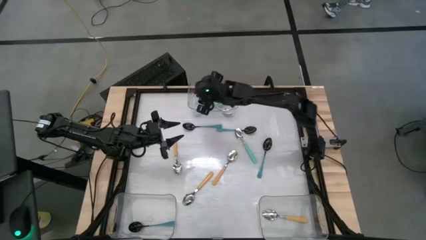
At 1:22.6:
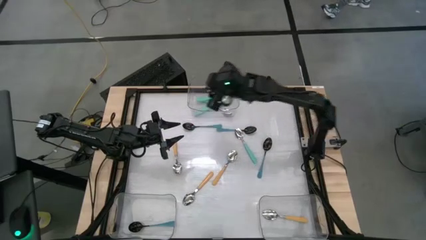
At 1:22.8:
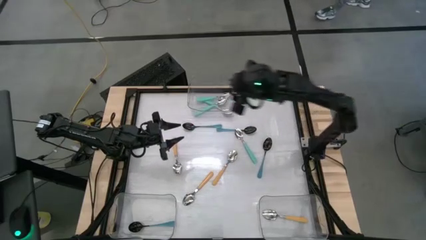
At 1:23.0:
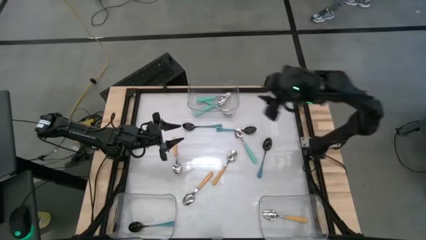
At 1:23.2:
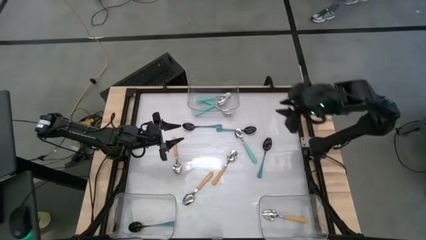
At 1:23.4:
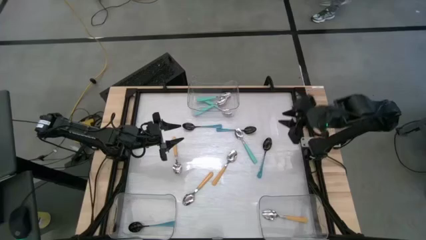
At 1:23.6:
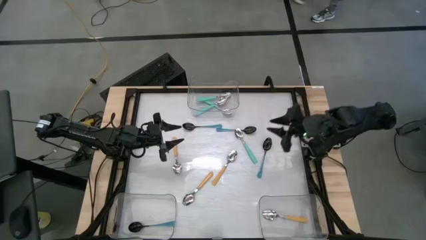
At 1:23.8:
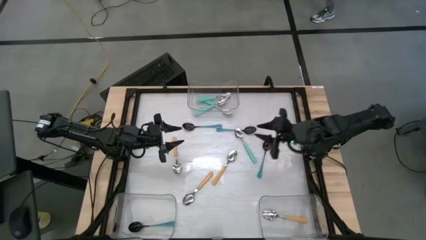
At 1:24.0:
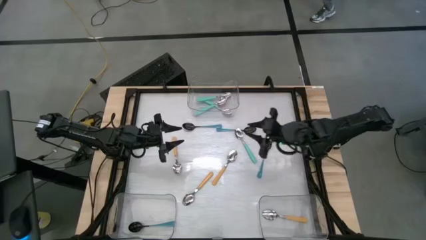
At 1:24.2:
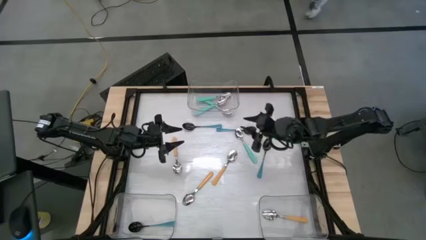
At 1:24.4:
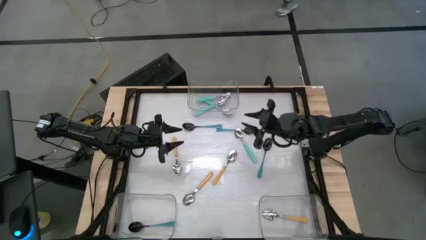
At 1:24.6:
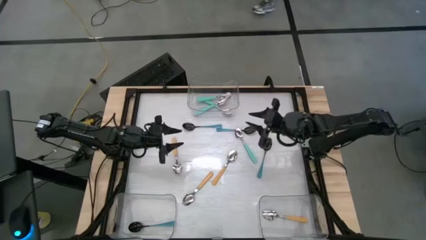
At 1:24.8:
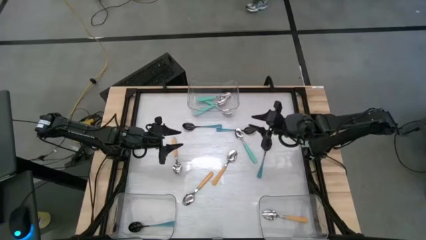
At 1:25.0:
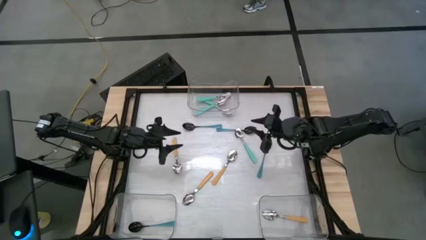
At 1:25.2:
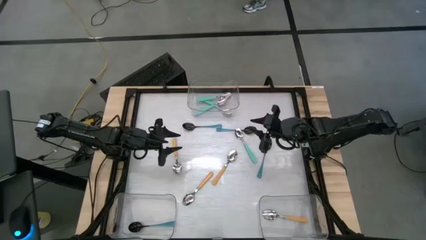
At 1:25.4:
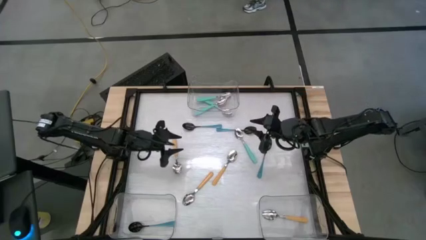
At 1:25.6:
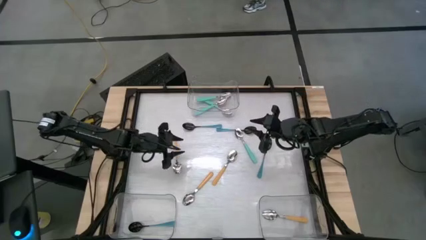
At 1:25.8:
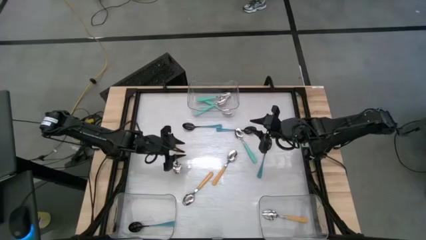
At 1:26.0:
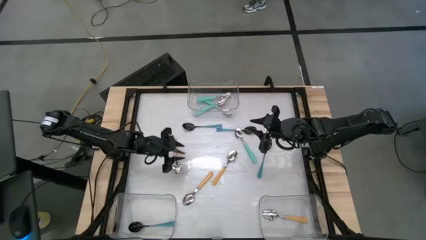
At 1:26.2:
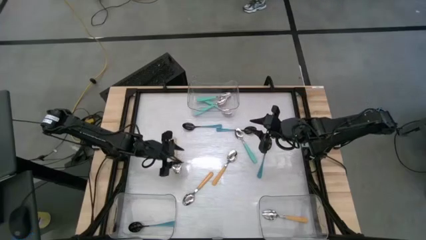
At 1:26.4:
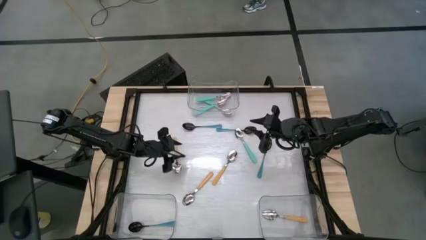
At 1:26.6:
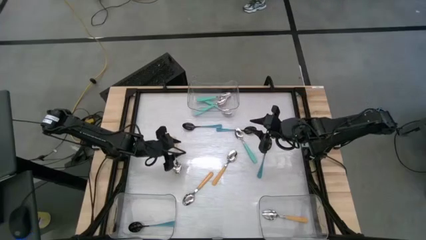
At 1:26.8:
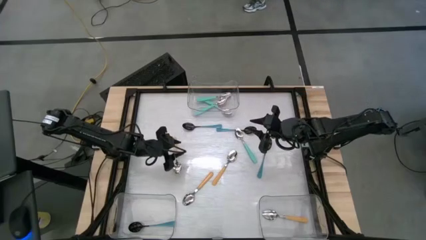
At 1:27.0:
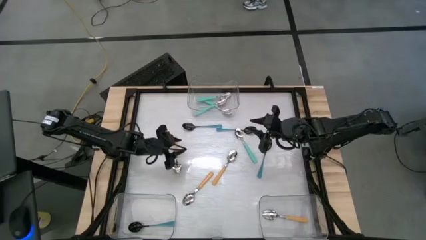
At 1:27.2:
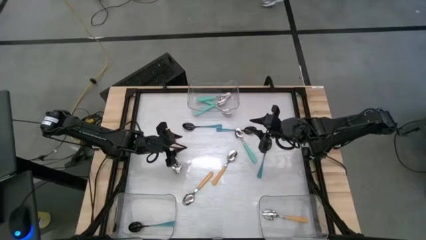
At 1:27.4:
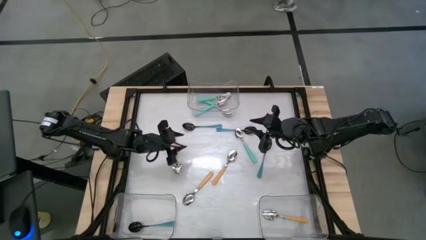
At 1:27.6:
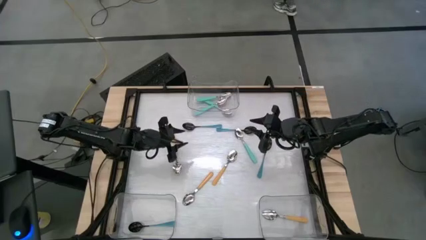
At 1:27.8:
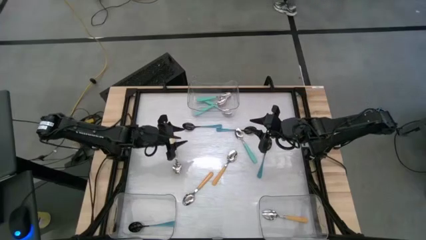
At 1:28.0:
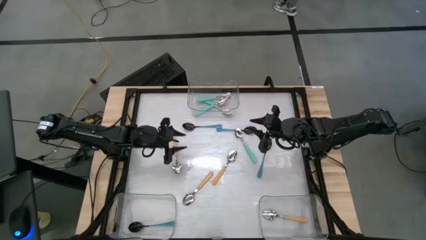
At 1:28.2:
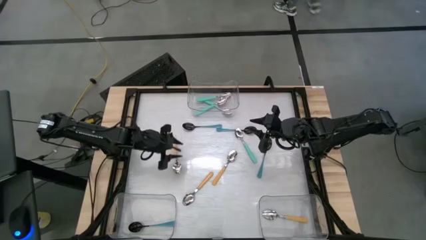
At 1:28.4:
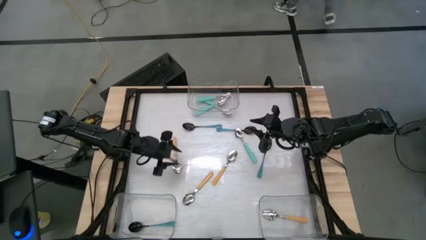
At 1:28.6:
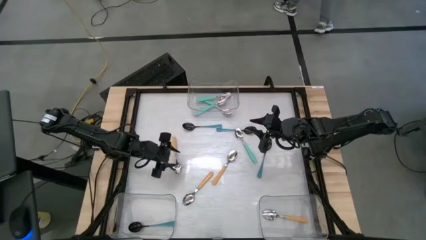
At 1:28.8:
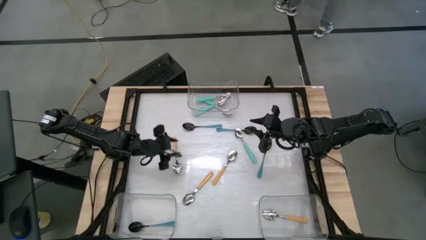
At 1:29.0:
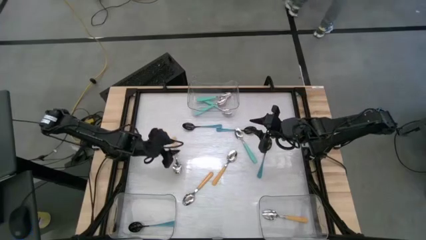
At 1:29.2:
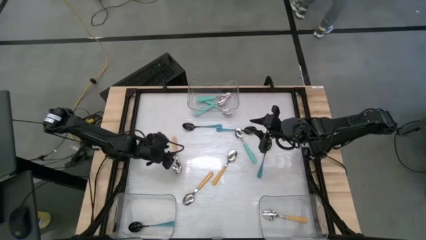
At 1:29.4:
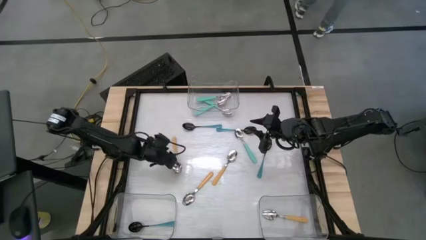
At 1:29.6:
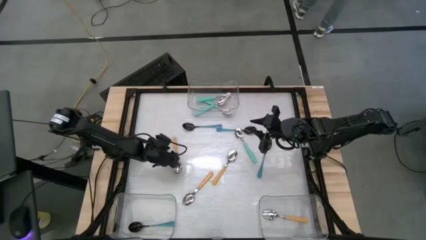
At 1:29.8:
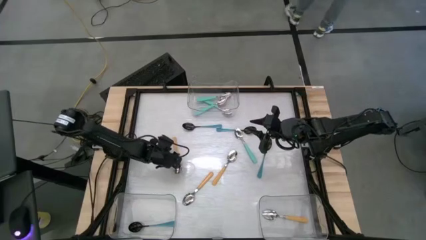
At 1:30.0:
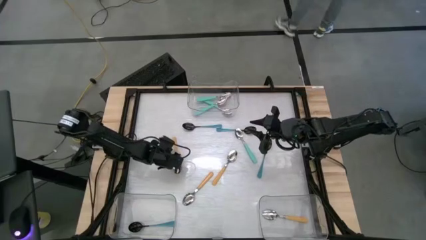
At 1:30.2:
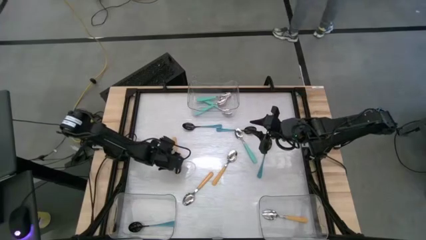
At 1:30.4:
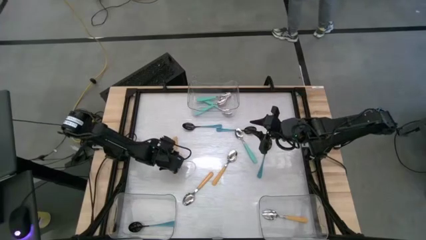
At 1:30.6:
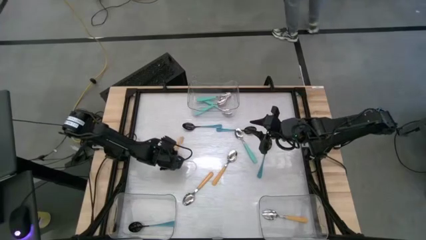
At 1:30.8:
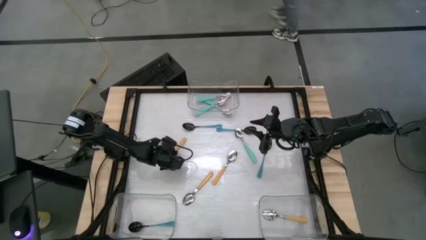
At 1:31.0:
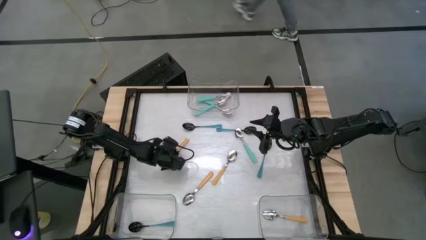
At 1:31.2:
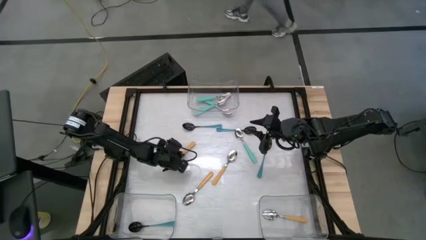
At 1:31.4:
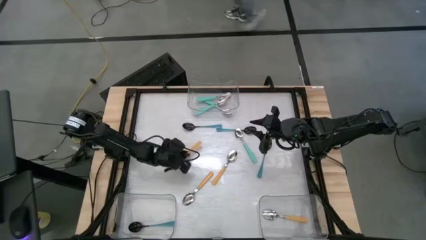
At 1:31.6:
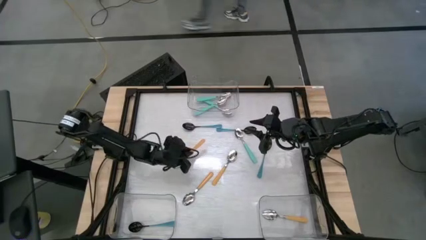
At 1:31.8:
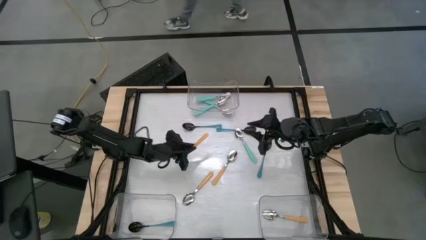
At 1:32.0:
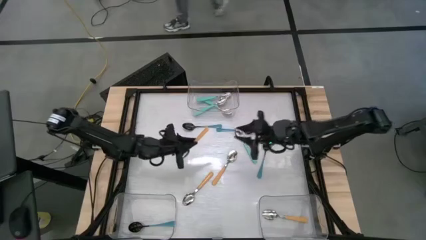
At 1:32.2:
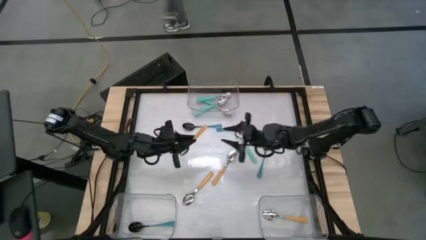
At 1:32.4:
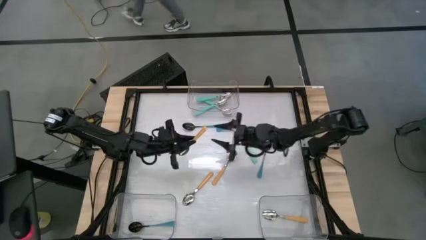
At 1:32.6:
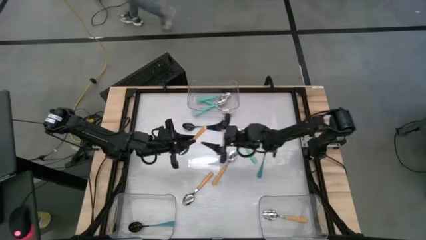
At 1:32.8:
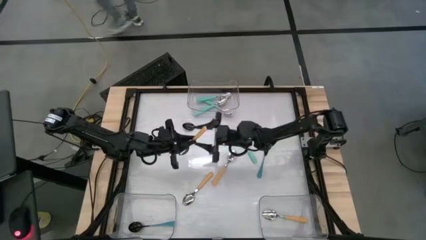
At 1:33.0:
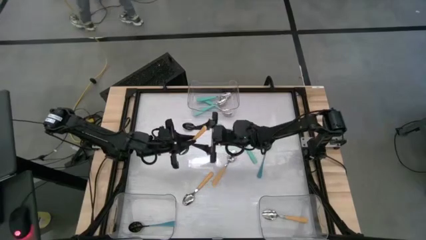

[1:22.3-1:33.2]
Task: Sort silverware by color (type)
Put the left orange spoon into the bottom right transparent bin

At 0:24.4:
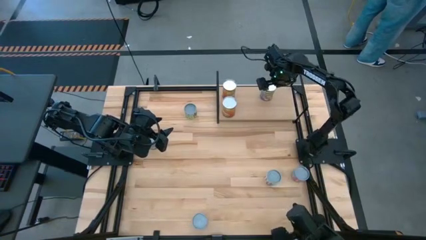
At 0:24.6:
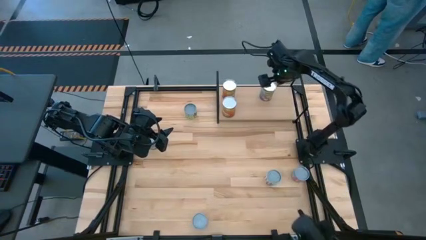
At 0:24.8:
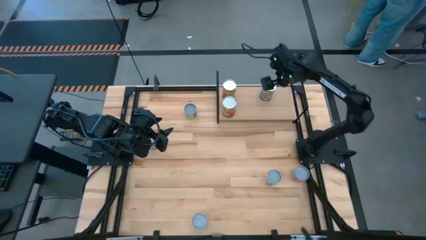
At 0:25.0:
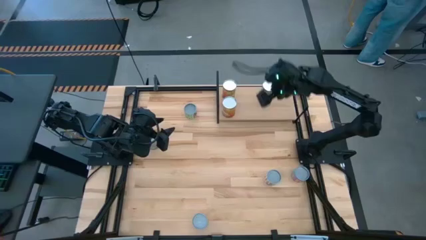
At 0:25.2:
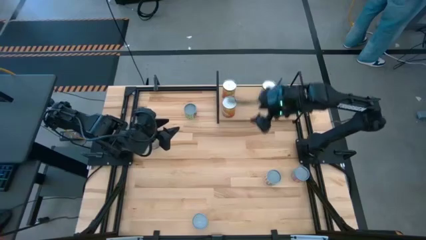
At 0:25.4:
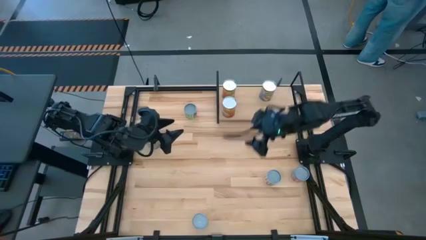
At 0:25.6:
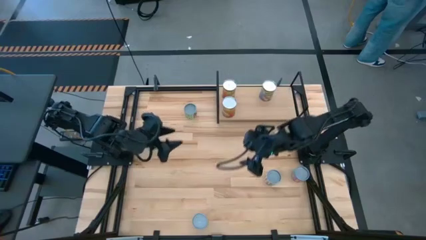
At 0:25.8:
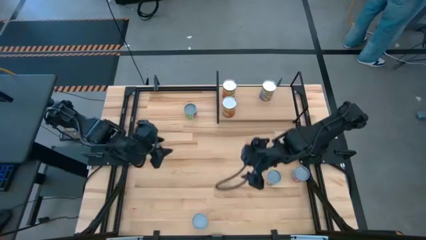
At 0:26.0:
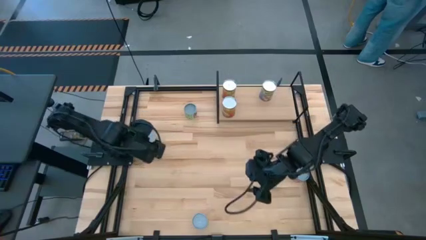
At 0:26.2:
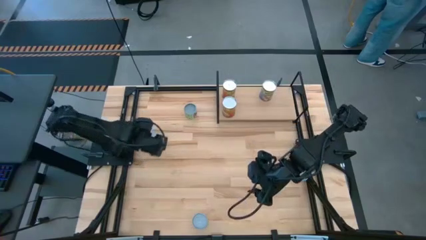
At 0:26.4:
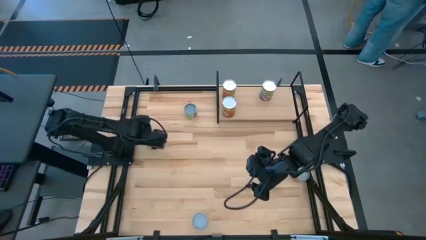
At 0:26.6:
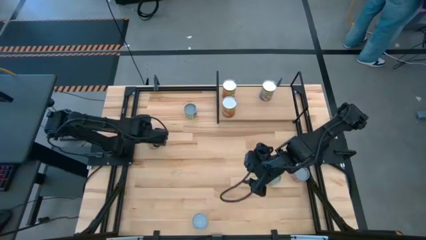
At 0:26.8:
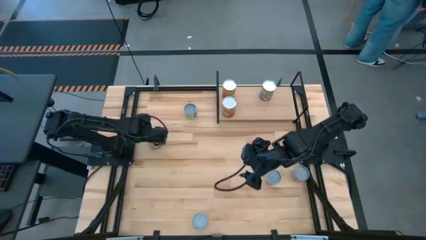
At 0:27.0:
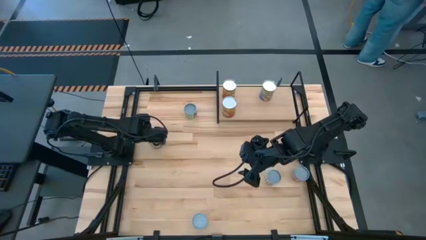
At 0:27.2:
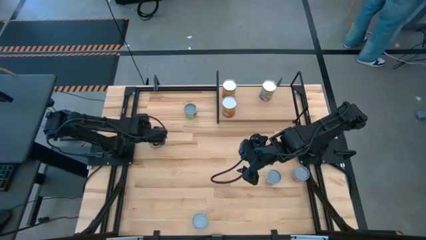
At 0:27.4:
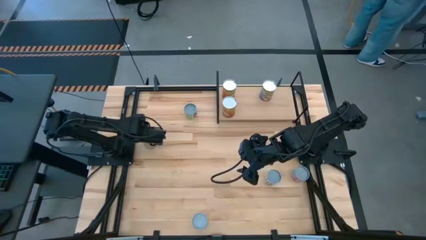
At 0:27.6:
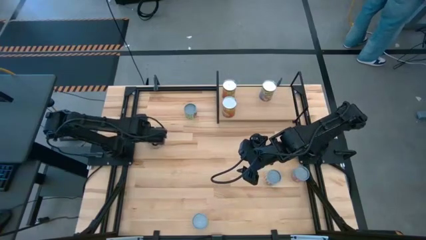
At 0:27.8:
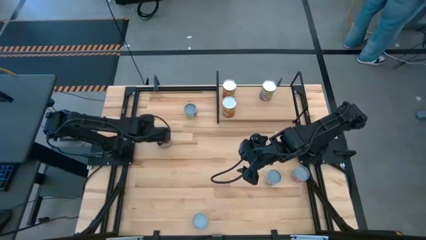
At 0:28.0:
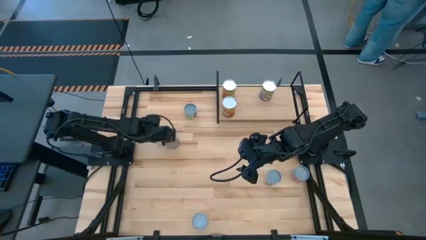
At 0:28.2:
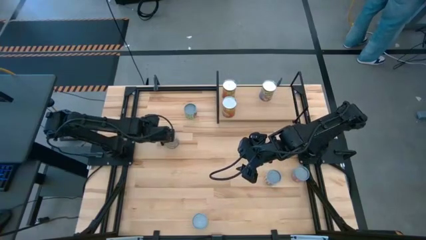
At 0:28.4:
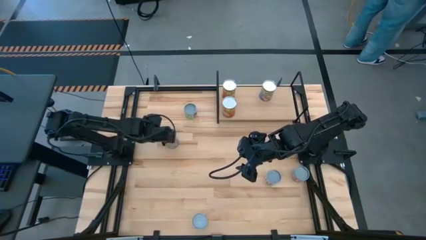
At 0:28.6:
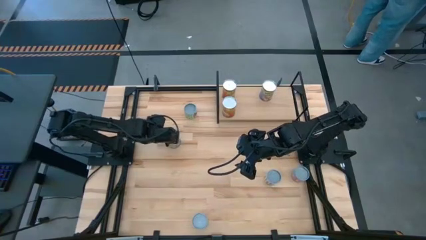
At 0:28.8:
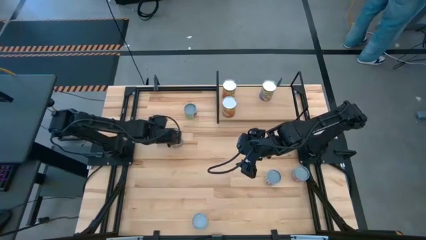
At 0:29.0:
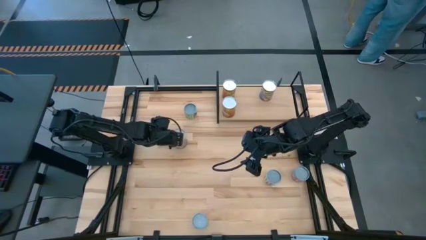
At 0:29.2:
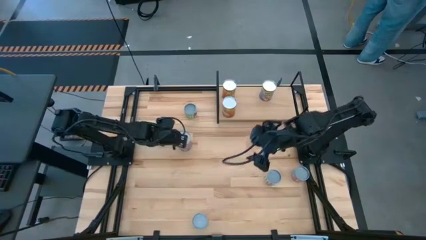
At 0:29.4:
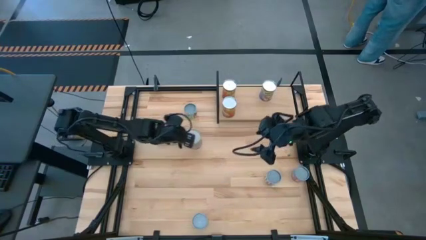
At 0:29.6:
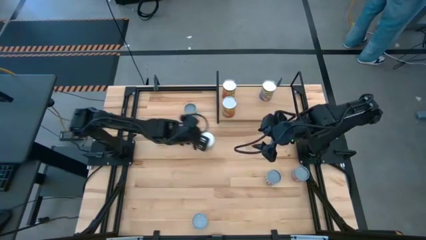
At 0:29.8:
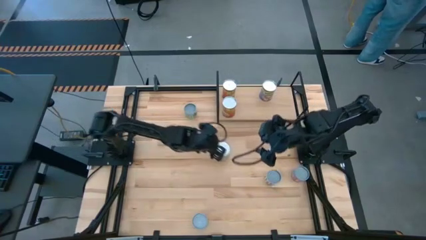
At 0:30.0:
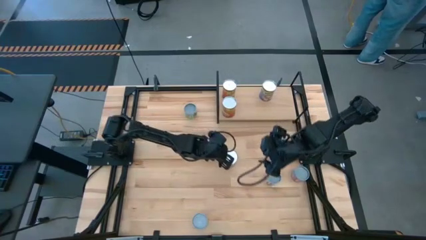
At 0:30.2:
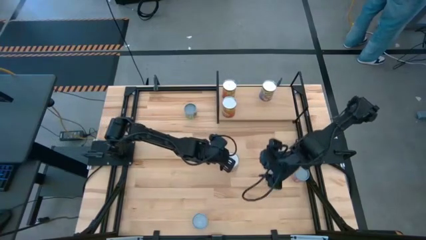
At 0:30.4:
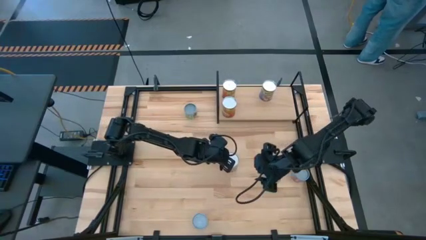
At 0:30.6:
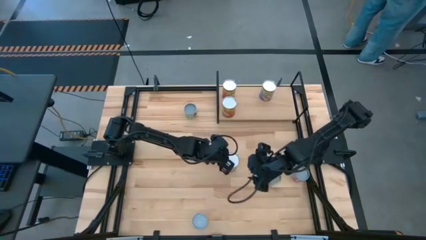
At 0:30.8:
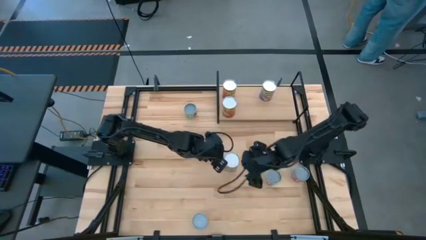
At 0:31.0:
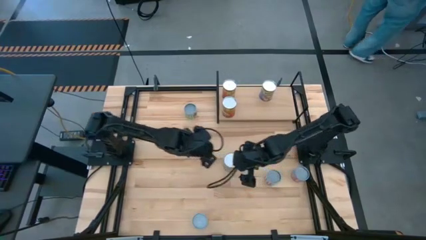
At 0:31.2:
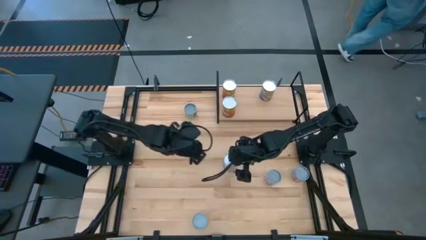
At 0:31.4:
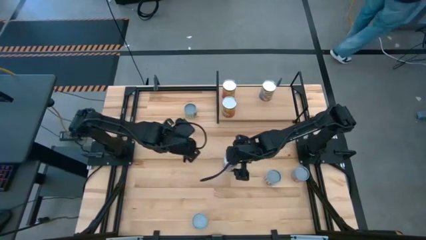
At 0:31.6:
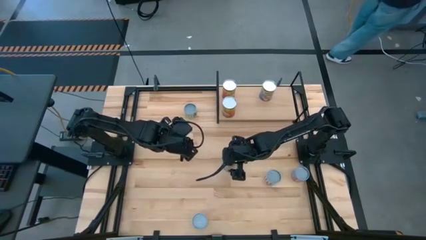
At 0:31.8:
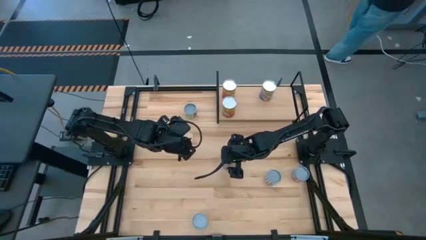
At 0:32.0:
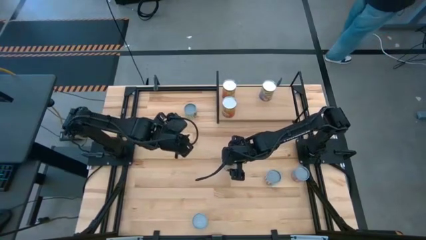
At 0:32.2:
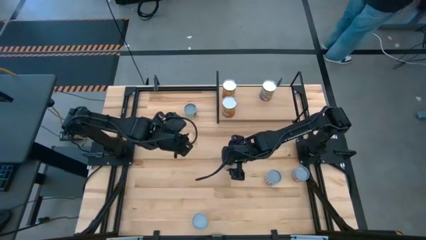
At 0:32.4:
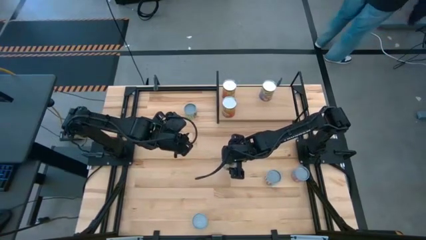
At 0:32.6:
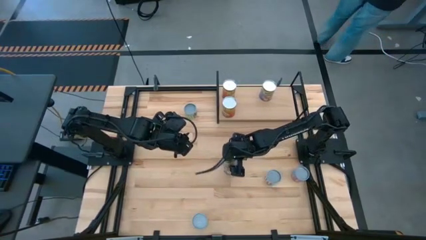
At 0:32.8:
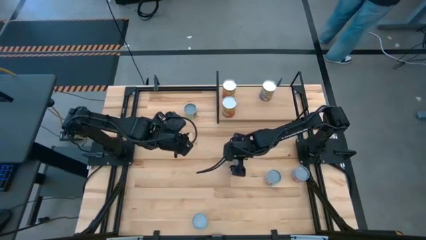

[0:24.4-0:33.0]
Task: Pick and place cans onto a shelf
Put the big blue can on the shelf aligned with the other big blue can
